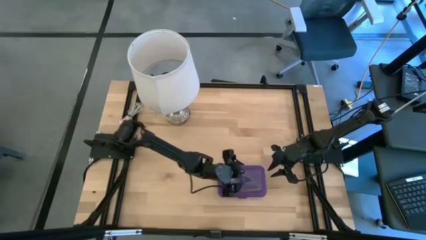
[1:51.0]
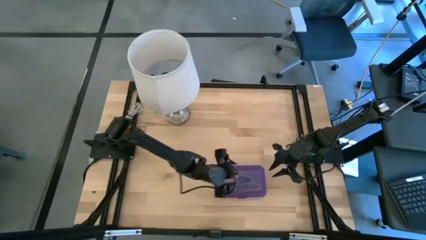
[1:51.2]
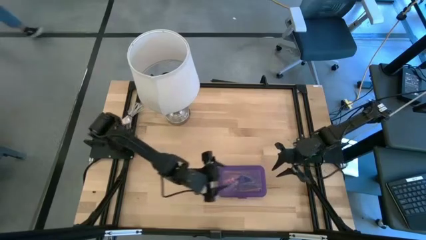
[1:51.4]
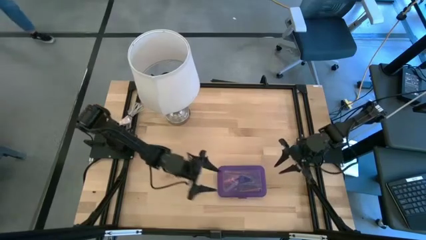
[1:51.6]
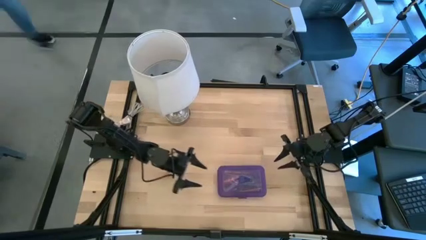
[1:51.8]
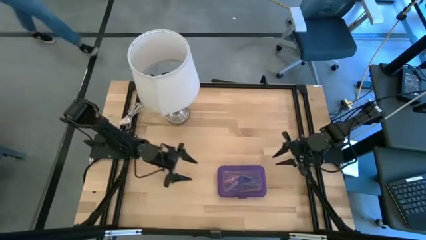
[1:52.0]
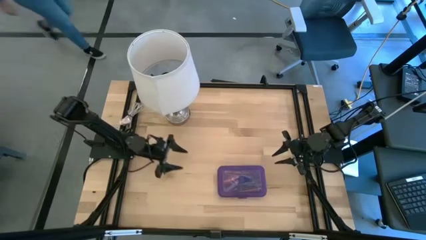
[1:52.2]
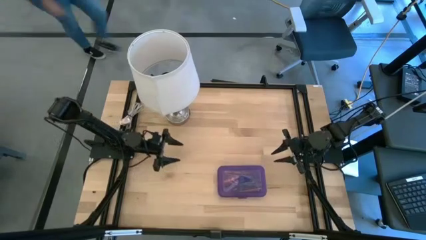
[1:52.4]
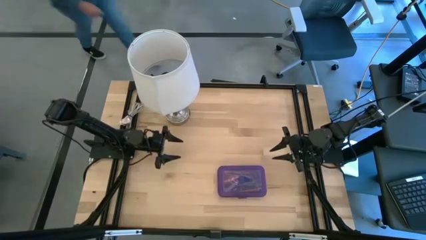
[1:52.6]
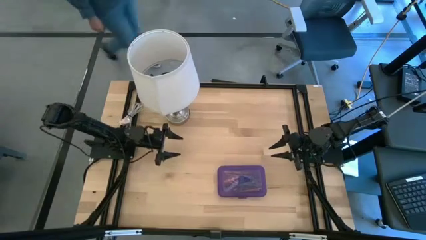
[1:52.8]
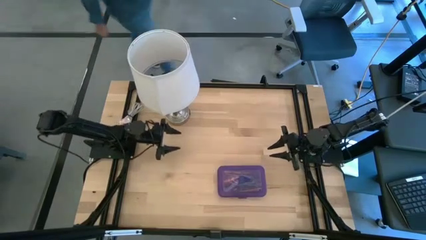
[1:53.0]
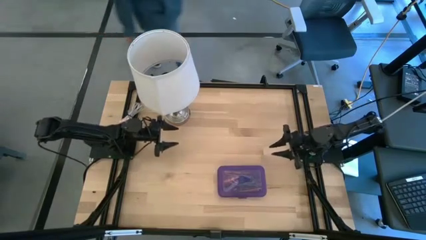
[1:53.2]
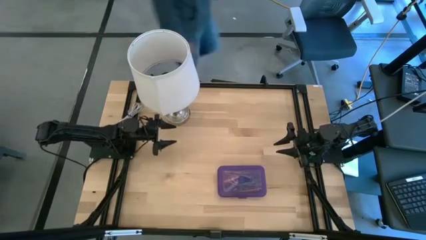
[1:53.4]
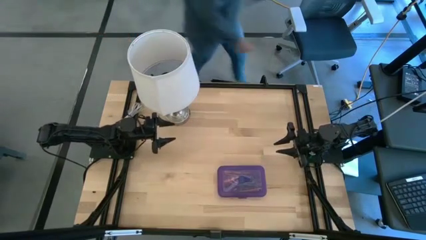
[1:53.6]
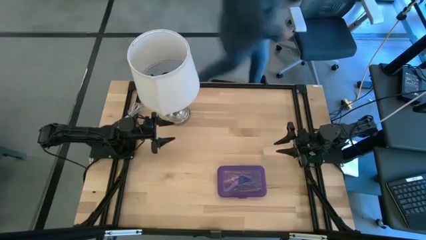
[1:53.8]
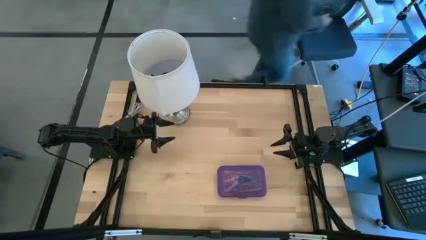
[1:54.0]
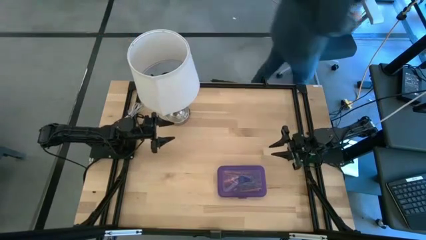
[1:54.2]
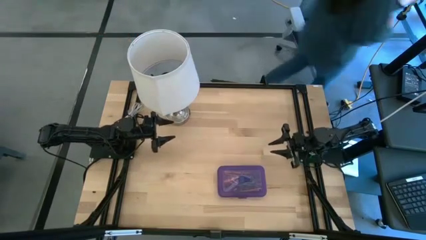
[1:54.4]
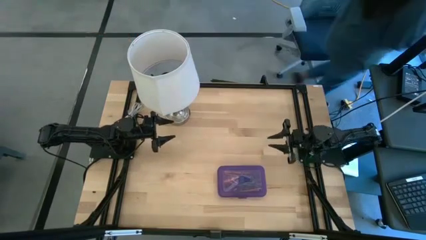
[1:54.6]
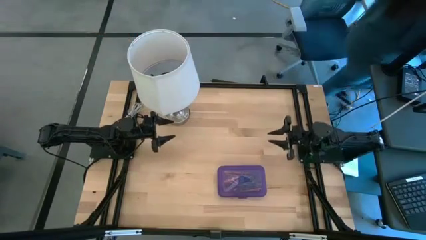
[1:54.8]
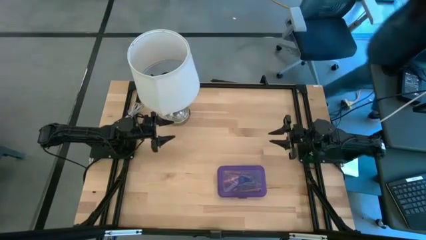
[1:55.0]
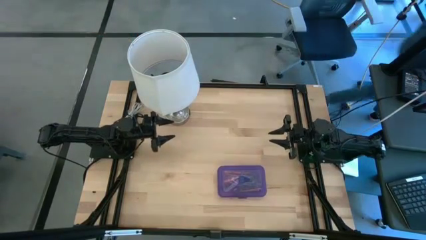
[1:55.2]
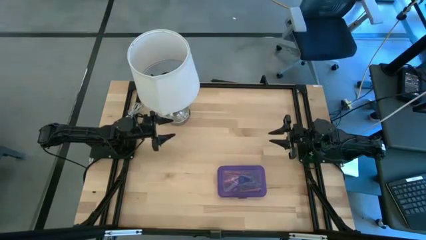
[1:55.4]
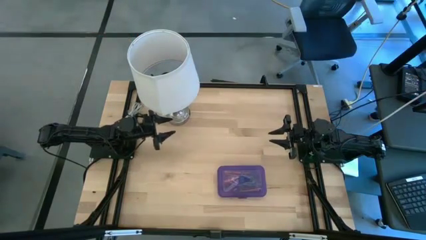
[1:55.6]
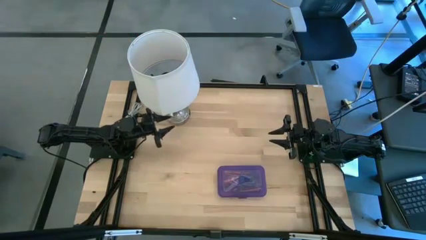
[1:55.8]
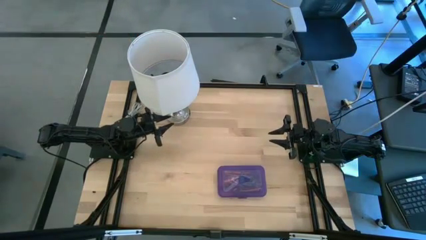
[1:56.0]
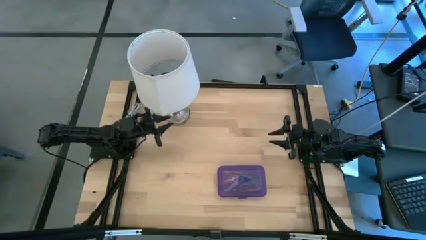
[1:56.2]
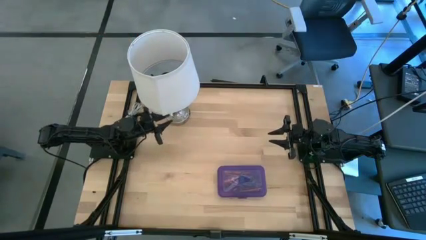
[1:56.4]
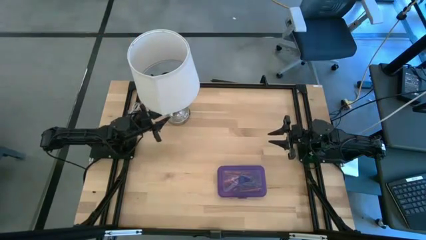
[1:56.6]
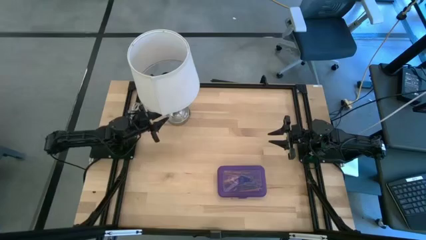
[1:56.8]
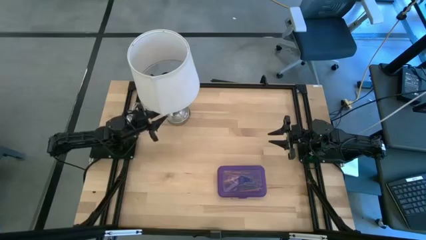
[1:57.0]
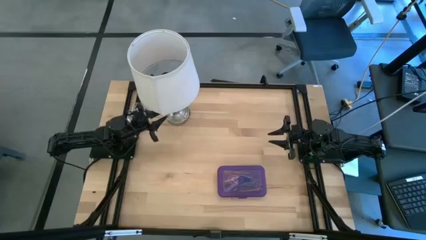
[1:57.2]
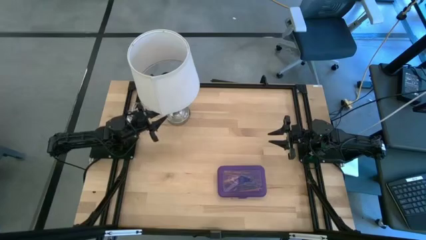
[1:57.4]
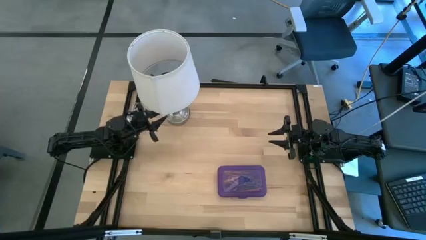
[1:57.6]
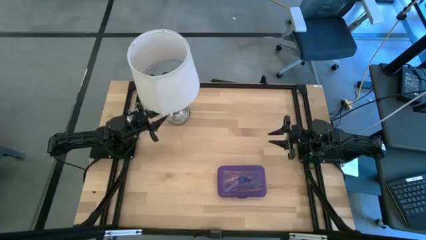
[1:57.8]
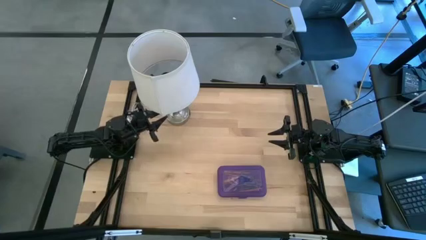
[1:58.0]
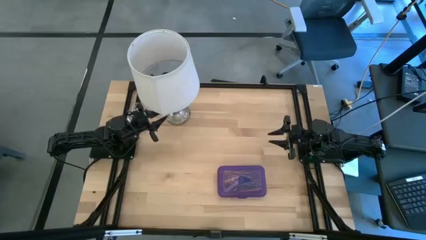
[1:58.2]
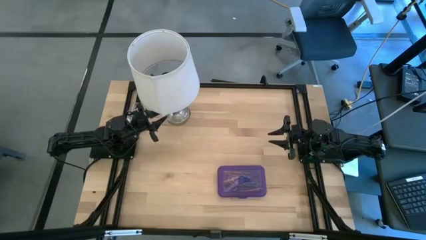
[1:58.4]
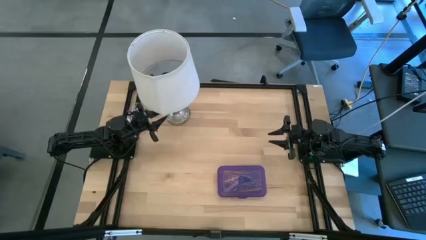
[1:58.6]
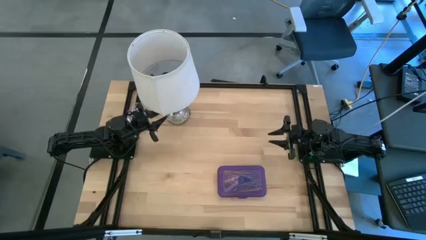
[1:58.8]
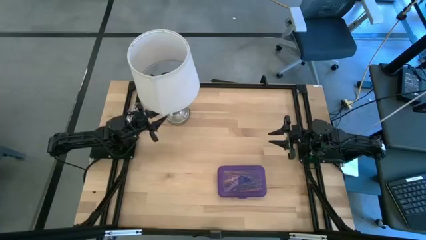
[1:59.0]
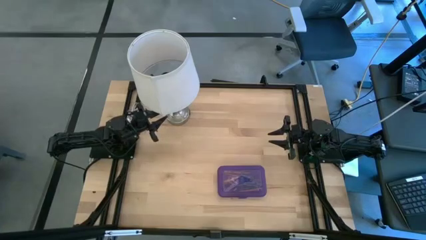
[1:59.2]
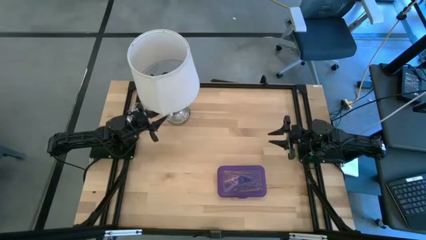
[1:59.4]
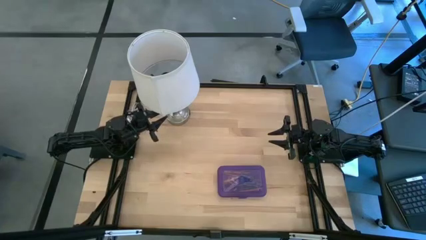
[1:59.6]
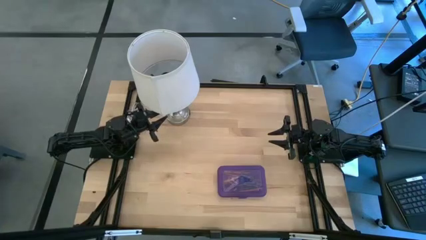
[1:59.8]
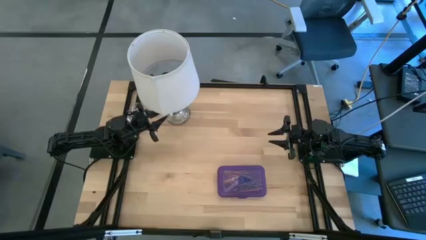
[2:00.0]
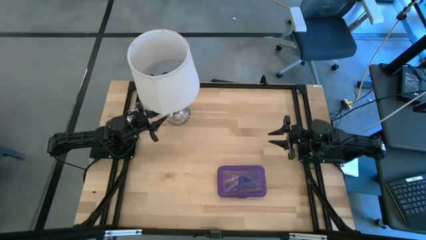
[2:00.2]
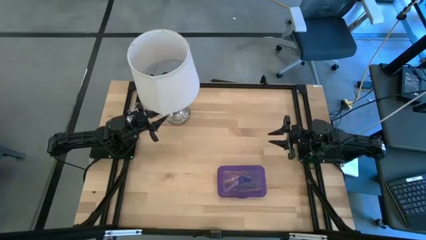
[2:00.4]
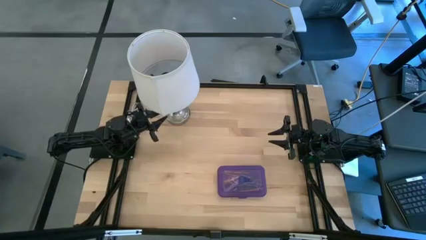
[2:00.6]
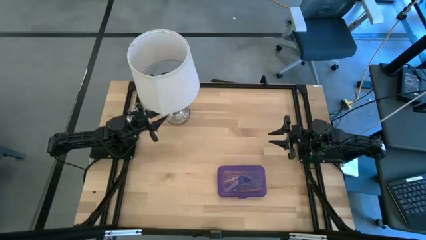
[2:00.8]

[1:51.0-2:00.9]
Task: Pick & place school supplies into a supply box
Return to Home Position

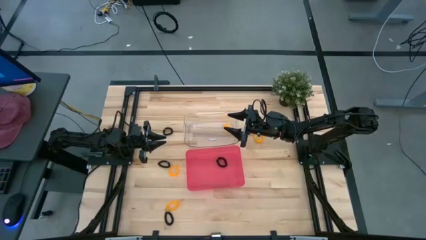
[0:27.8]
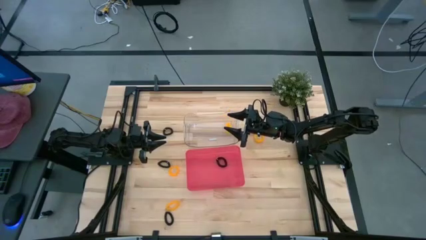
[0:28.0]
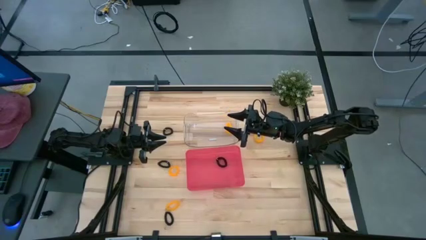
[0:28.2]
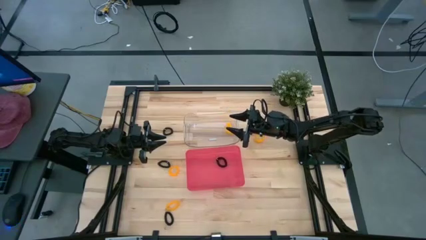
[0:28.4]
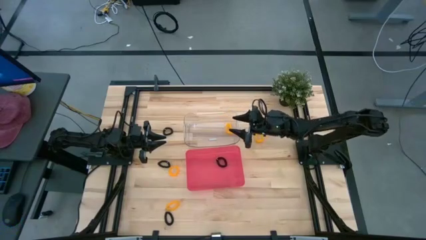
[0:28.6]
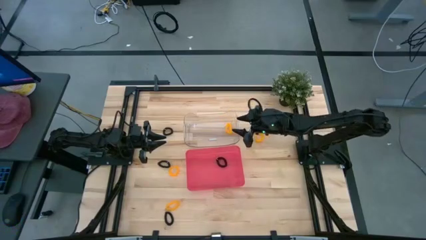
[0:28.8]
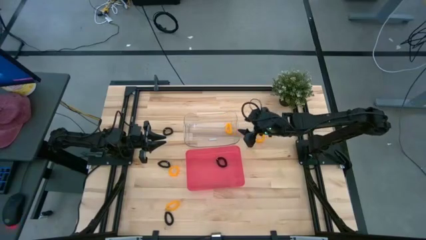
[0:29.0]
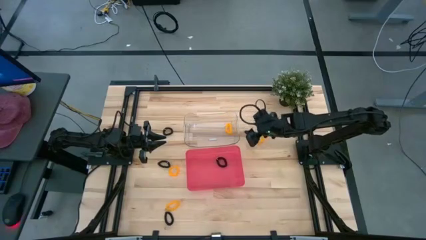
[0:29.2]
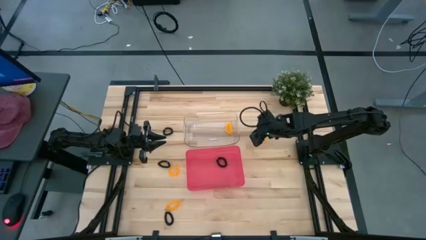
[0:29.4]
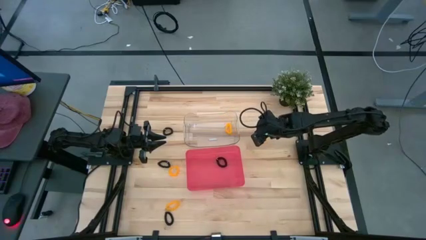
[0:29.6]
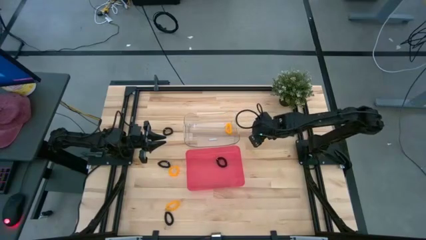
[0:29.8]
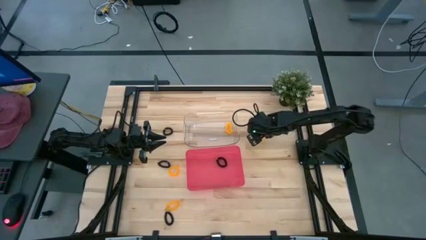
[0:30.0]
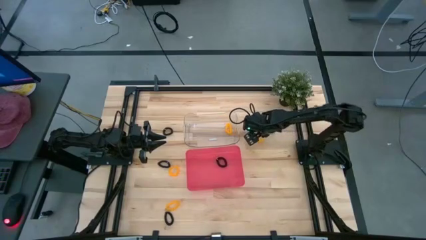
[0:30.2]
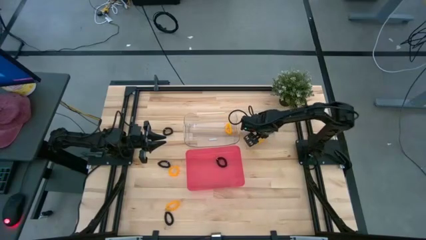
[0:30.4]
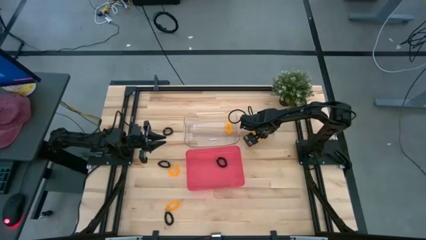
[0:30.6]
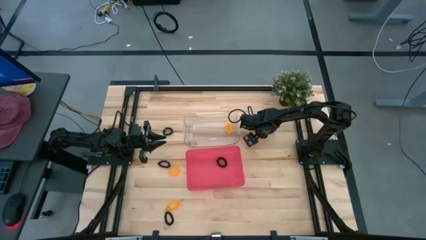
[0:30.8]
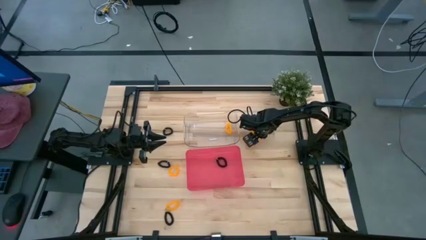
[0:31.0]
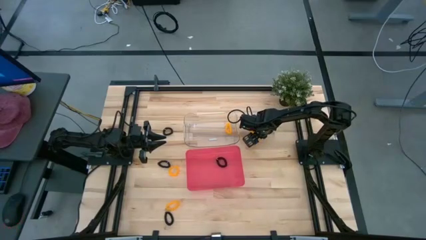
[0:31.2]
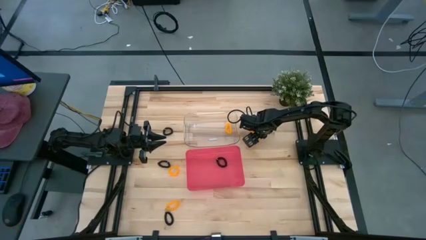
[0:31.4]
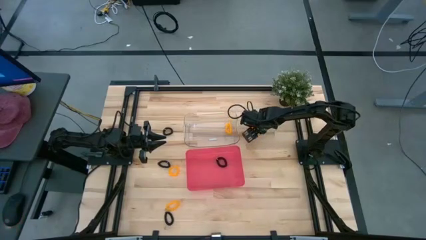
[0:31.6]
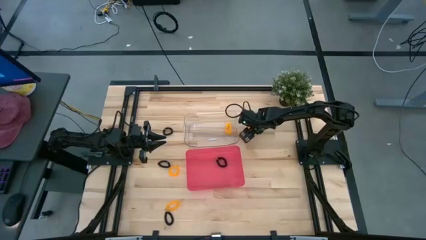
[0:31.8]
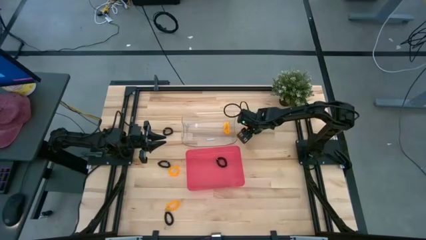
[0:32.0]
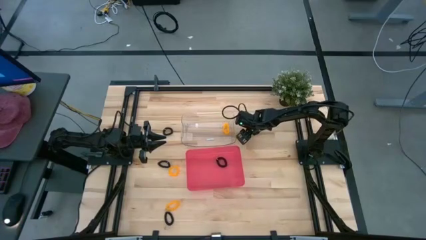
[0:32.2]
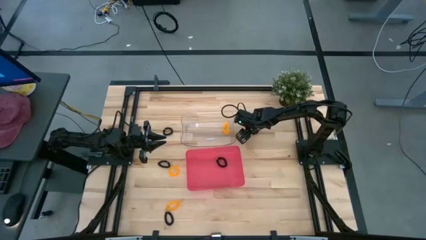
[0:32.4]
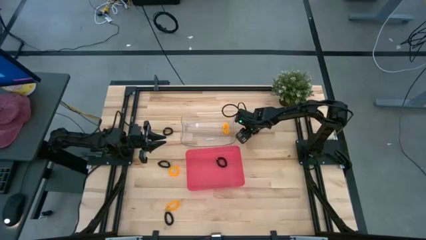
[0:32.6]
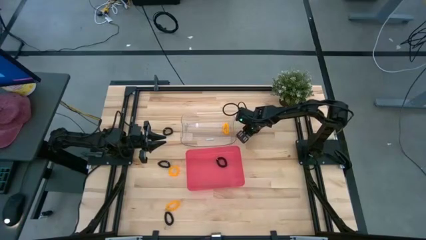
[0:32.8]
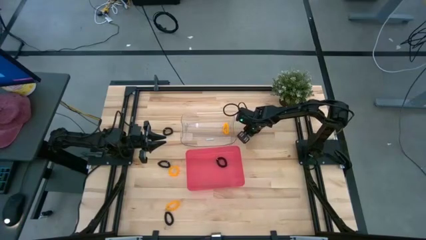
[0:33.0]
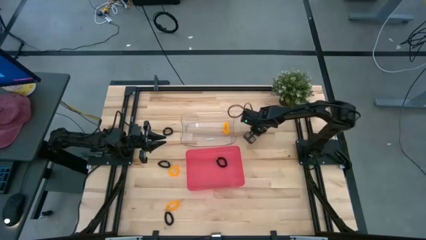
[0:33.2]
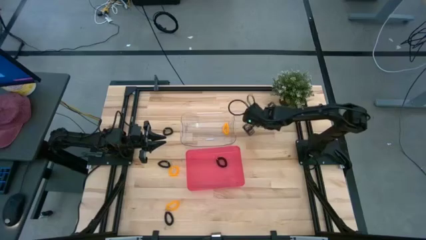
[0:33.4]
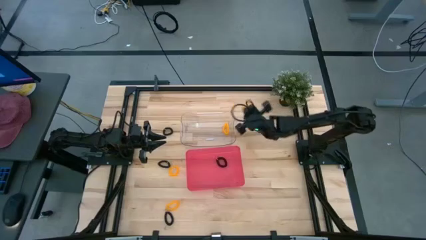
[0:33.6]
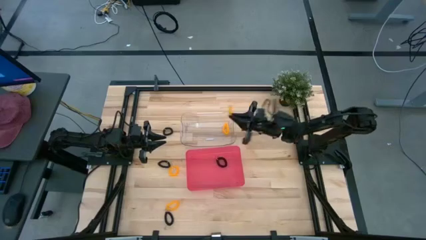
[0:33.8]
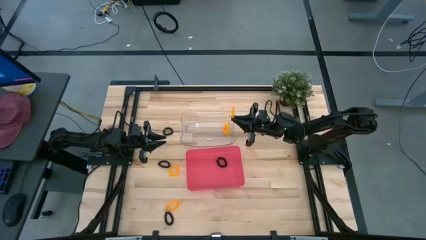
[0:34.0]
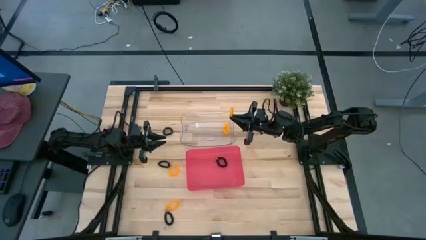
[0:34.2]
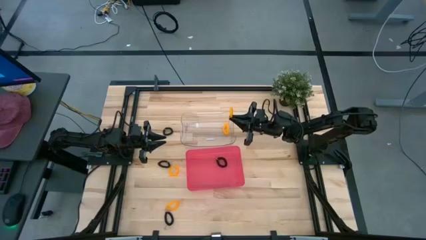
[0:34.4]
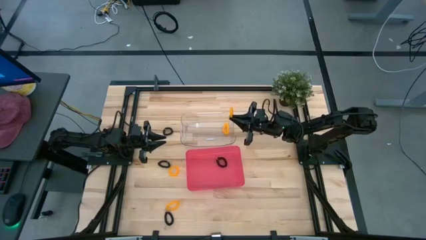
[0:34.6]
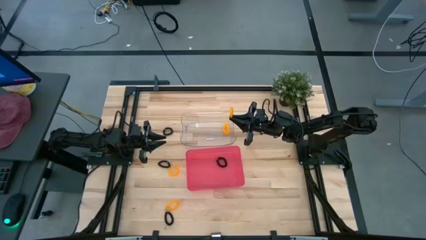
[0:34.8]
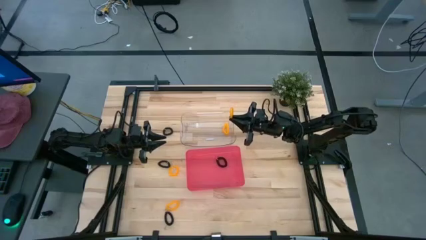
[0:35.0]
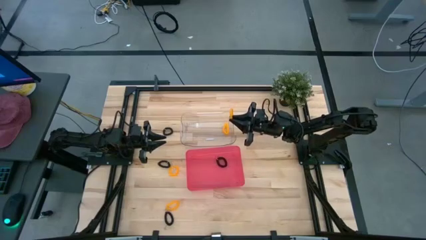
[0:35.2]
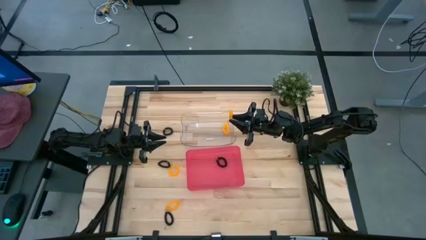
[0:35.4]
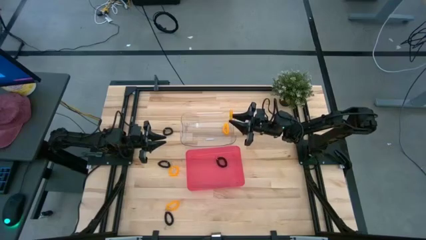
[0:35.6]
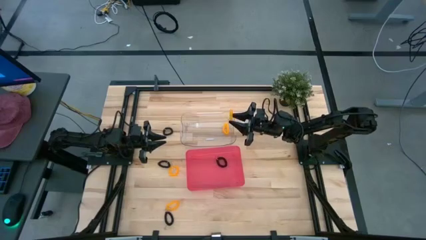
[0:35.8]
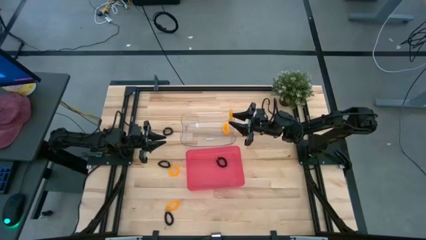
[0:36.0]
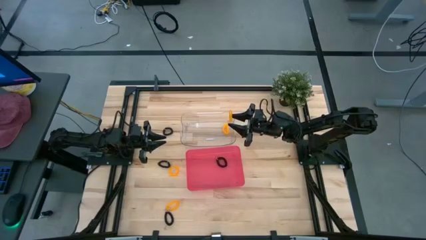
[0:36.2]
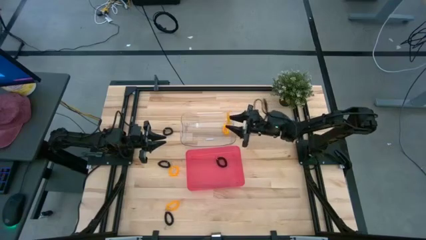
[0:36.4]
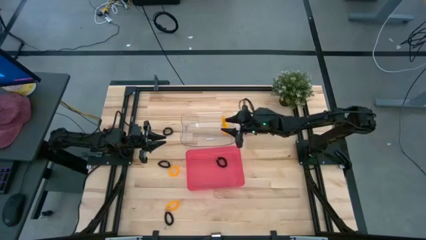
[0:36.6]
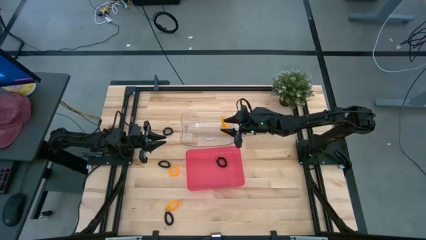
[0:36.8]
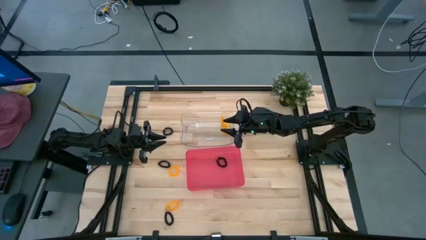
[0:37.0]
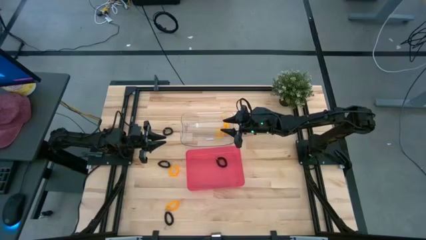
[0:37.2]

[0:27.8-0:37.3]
Task: Sort spring keychains
Put the yellow spring keychain into the transparent bin
